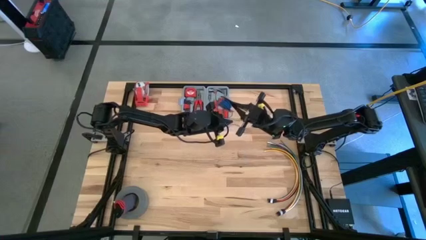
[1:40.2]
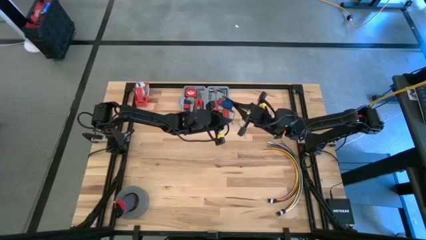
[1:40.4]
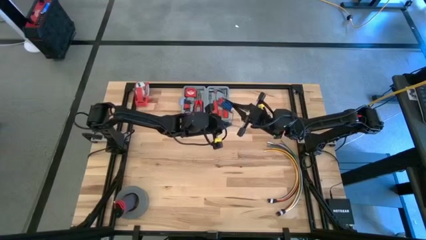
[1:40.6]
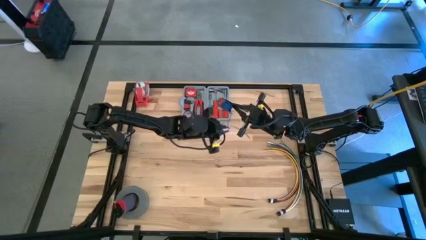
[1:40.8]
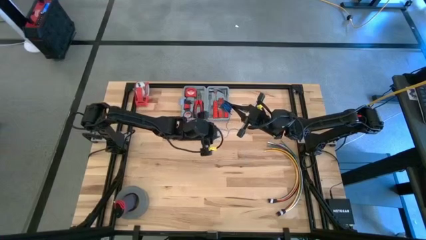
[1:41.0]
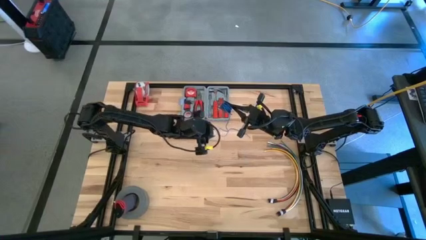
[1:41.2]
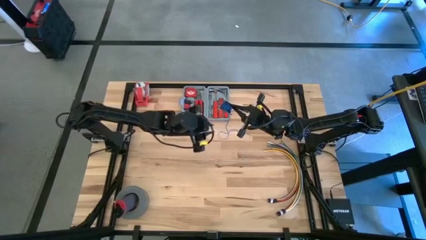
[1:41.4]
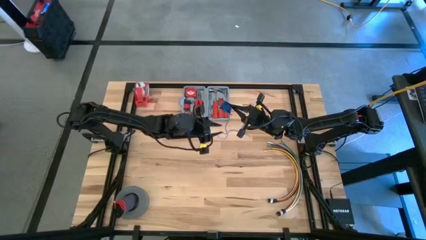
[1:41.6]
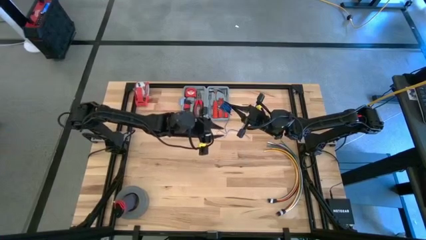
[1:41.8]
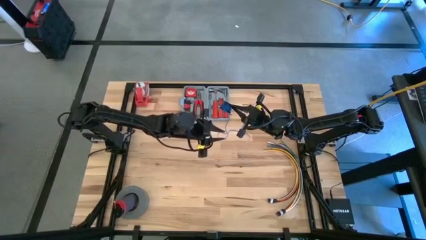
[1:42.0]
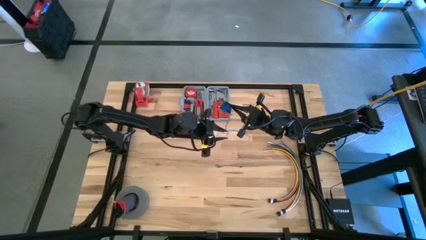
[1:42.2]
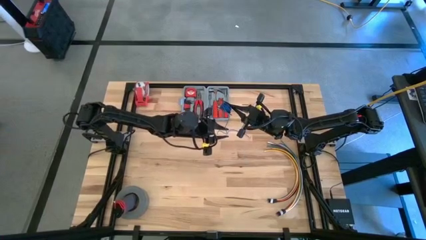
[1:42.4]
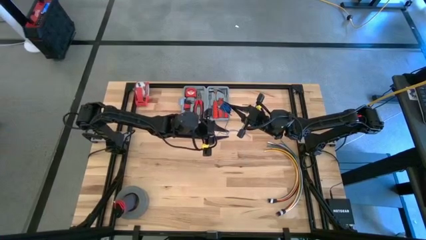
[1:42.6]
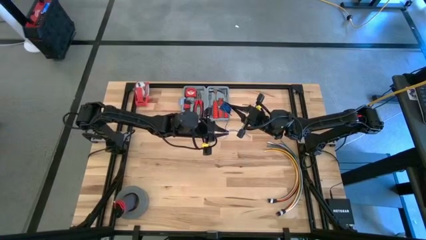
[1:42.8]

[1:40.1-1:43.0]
Task: Coil cords
Coil the blue wire into the black spool

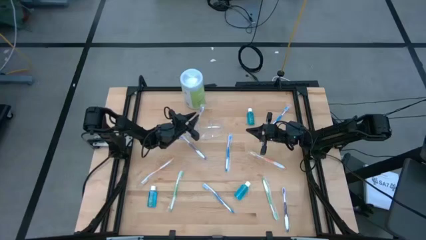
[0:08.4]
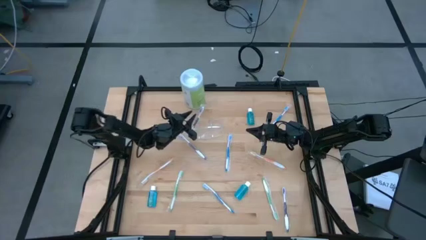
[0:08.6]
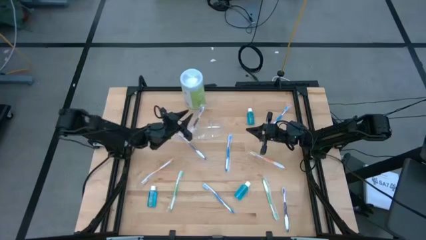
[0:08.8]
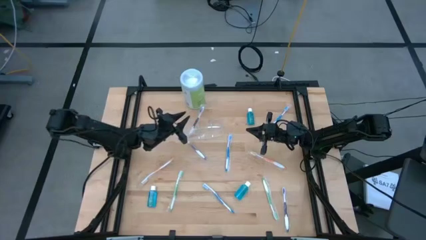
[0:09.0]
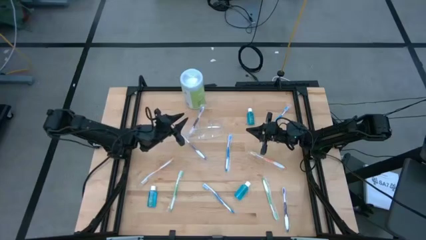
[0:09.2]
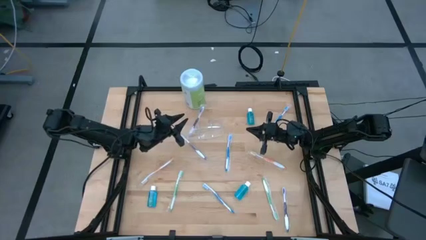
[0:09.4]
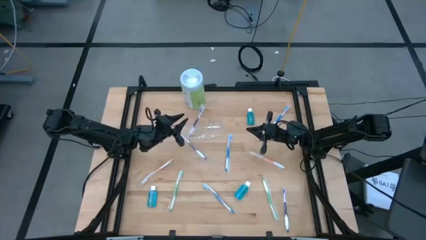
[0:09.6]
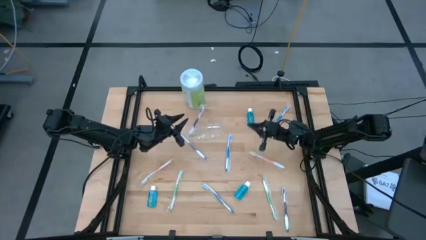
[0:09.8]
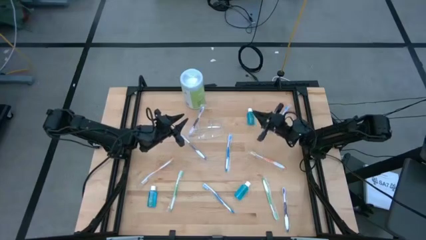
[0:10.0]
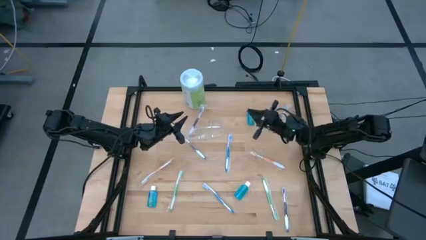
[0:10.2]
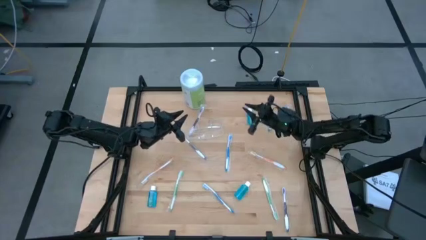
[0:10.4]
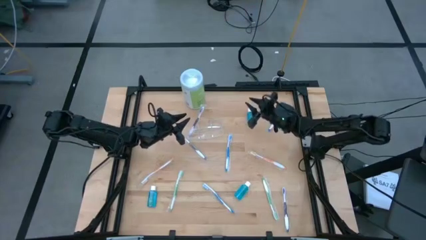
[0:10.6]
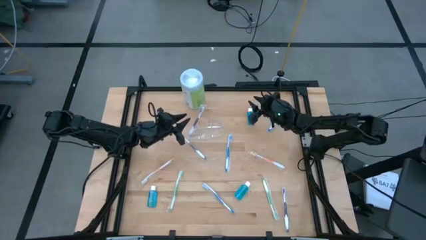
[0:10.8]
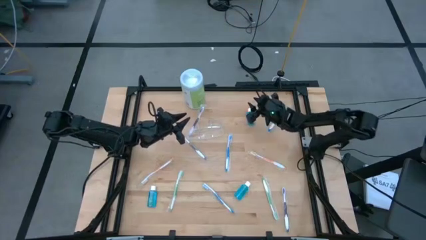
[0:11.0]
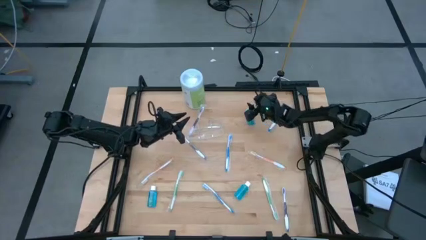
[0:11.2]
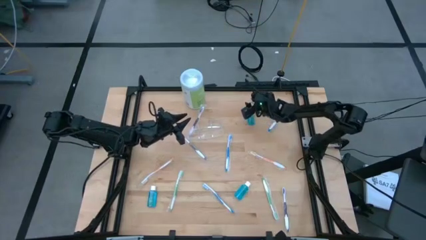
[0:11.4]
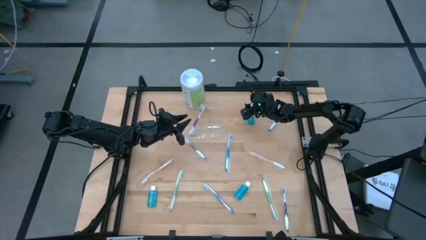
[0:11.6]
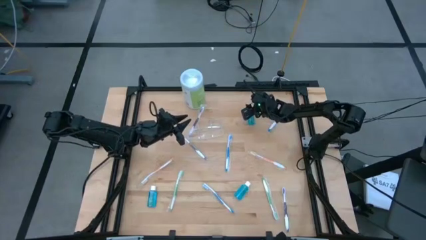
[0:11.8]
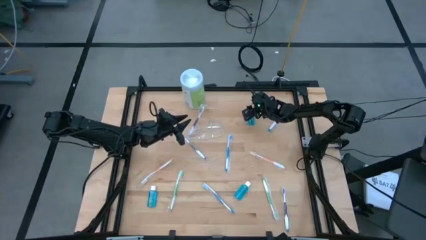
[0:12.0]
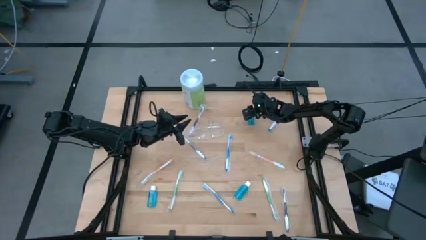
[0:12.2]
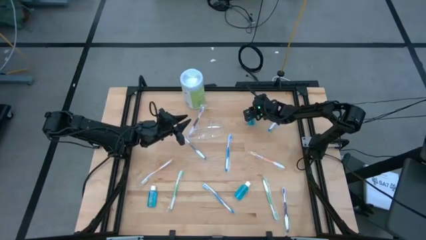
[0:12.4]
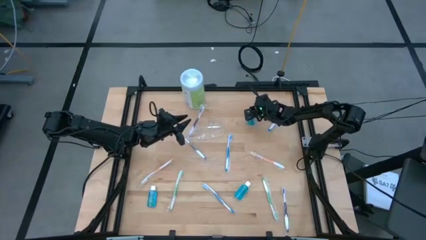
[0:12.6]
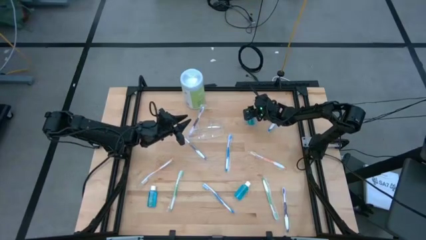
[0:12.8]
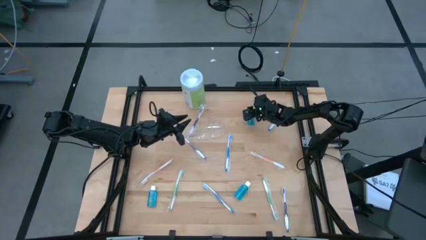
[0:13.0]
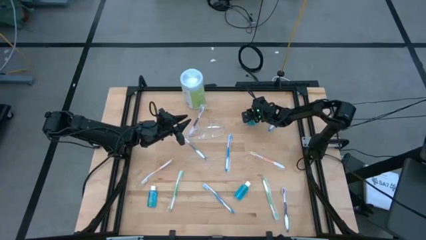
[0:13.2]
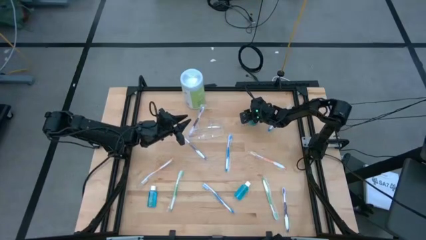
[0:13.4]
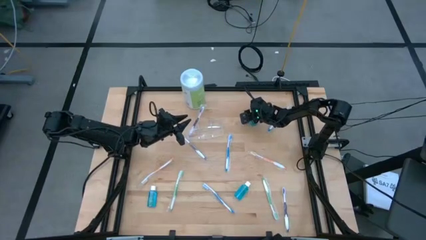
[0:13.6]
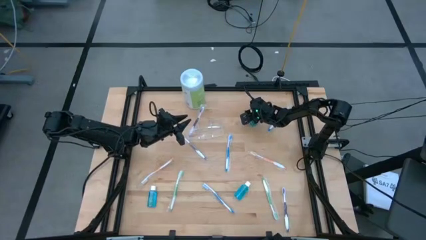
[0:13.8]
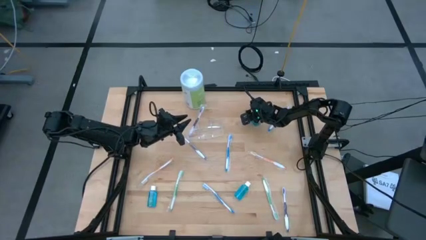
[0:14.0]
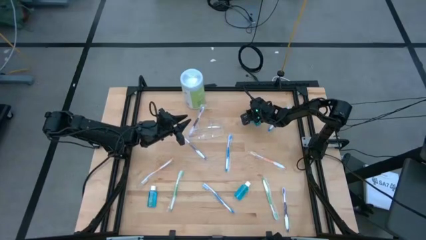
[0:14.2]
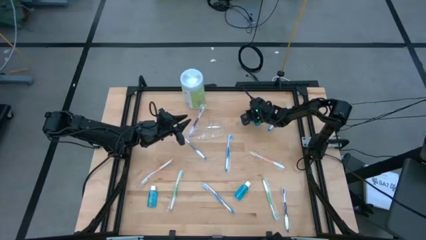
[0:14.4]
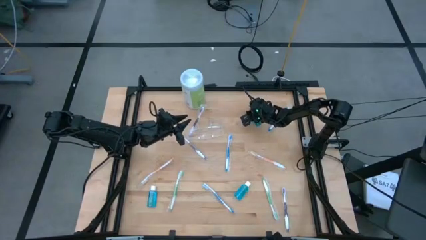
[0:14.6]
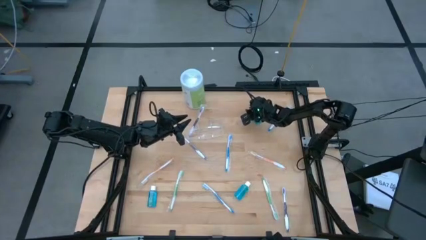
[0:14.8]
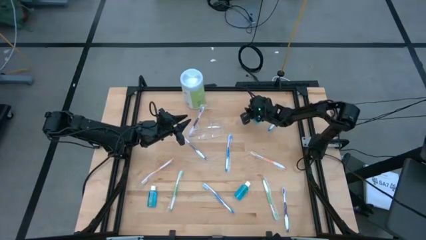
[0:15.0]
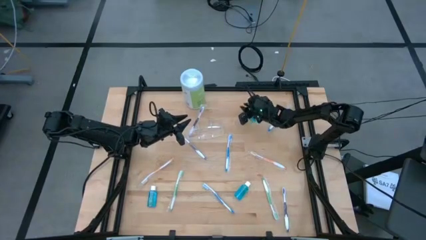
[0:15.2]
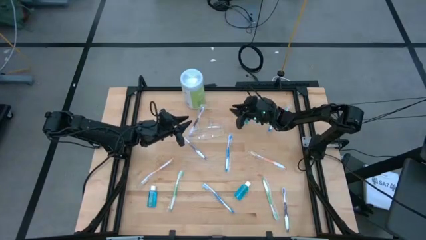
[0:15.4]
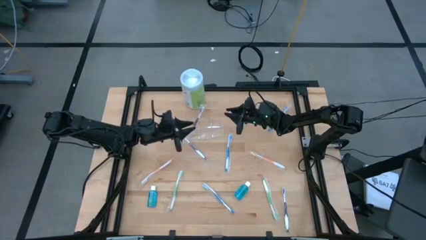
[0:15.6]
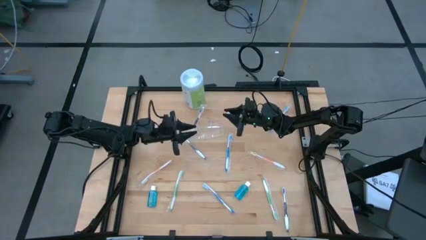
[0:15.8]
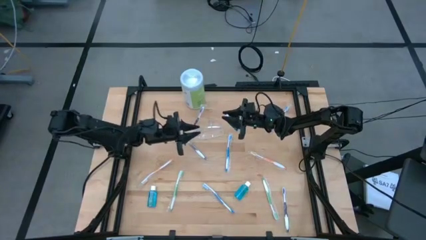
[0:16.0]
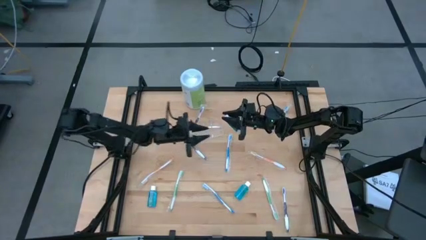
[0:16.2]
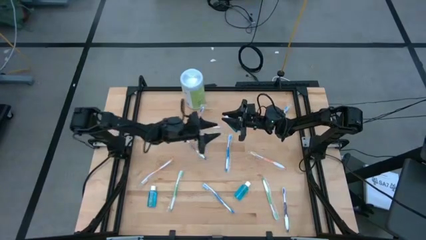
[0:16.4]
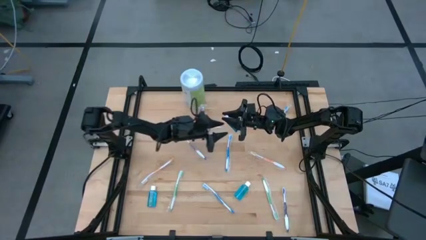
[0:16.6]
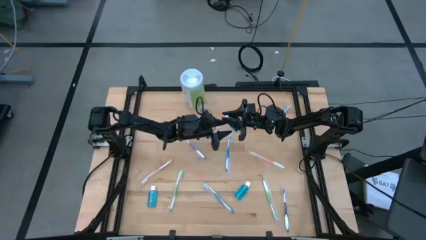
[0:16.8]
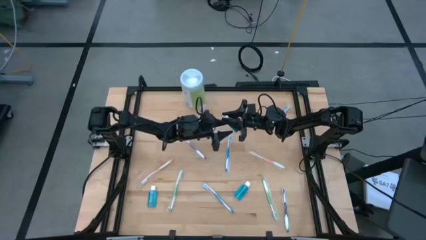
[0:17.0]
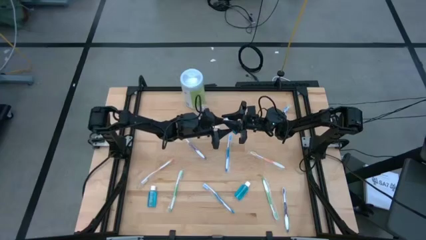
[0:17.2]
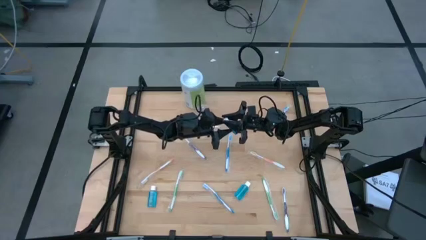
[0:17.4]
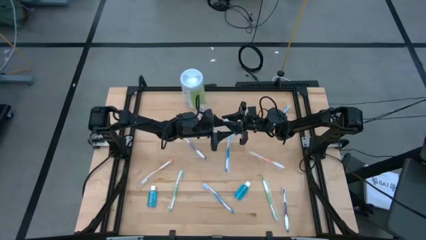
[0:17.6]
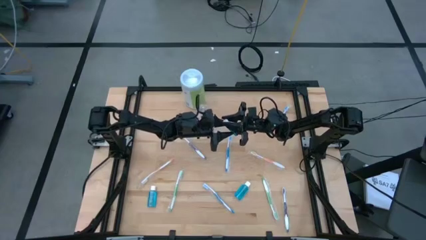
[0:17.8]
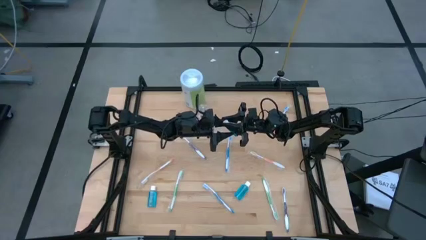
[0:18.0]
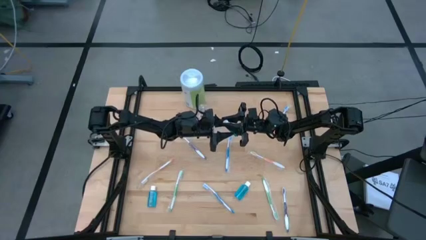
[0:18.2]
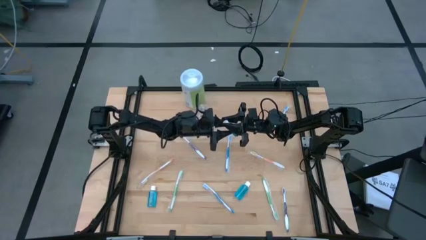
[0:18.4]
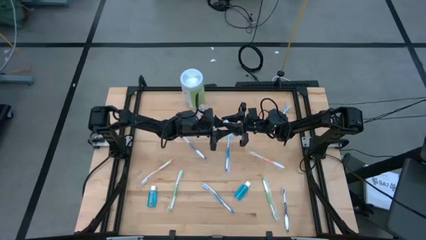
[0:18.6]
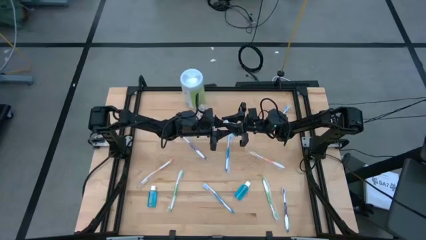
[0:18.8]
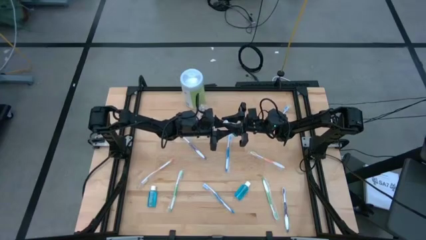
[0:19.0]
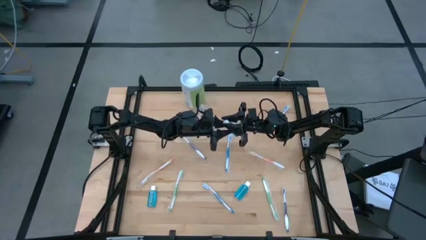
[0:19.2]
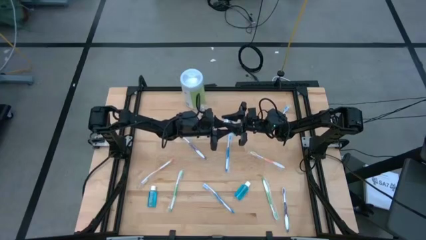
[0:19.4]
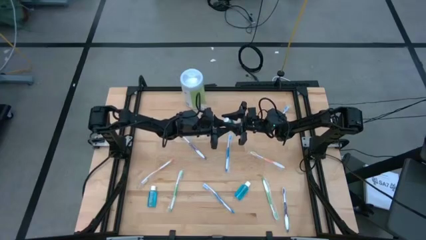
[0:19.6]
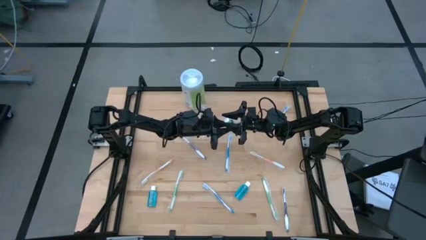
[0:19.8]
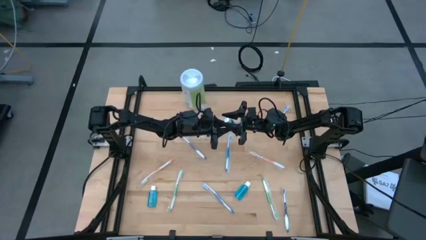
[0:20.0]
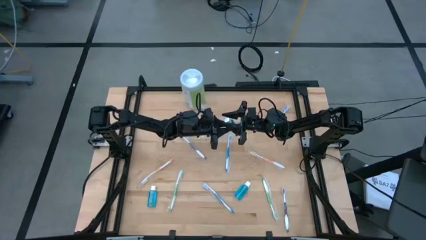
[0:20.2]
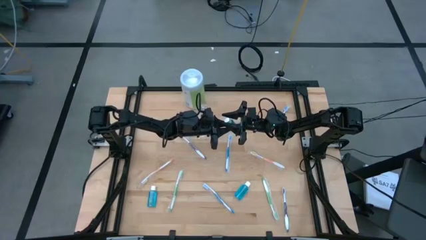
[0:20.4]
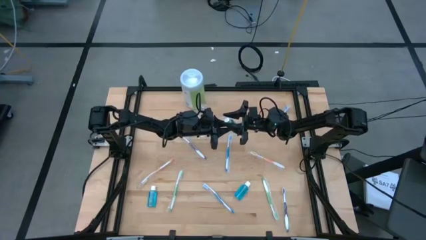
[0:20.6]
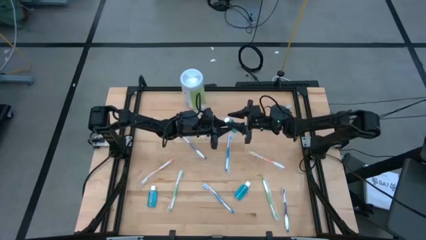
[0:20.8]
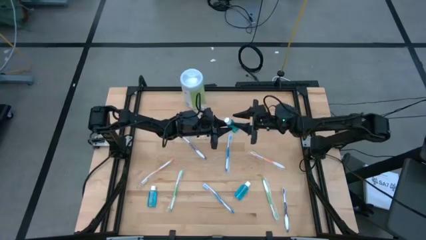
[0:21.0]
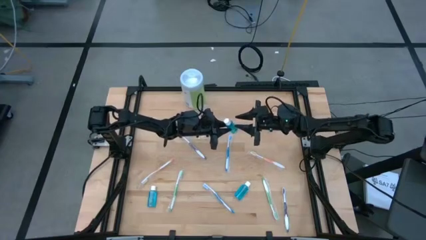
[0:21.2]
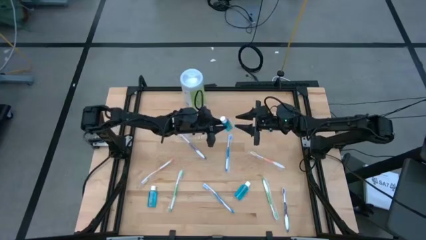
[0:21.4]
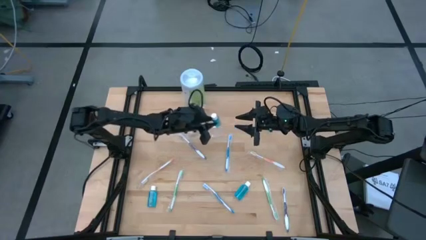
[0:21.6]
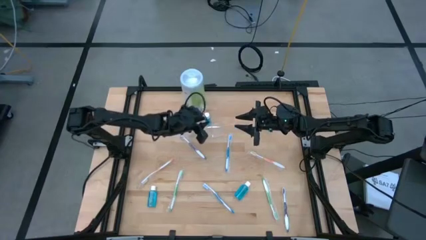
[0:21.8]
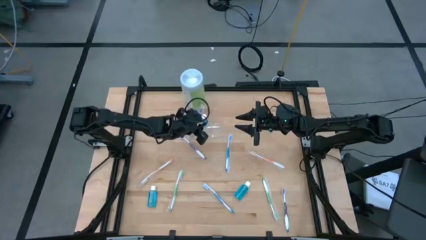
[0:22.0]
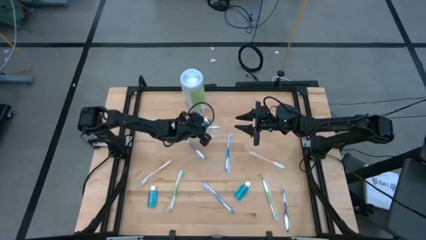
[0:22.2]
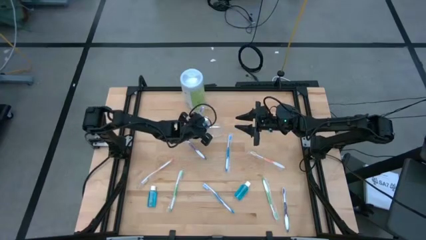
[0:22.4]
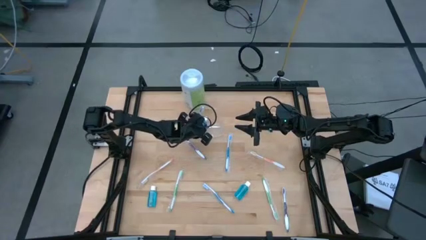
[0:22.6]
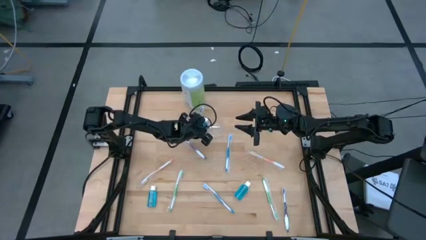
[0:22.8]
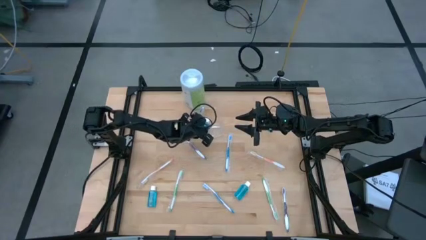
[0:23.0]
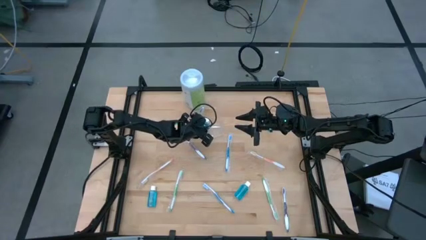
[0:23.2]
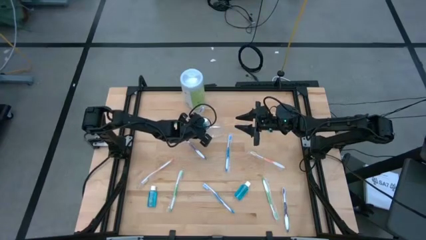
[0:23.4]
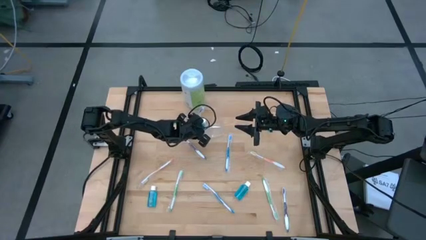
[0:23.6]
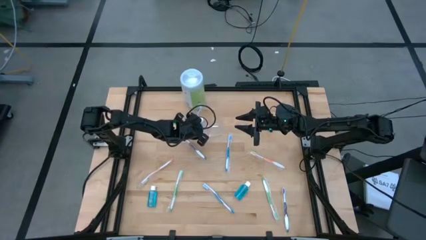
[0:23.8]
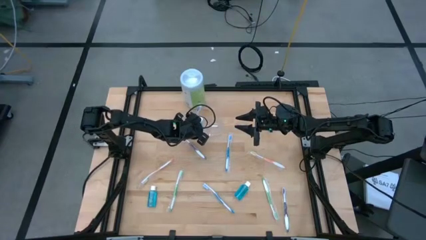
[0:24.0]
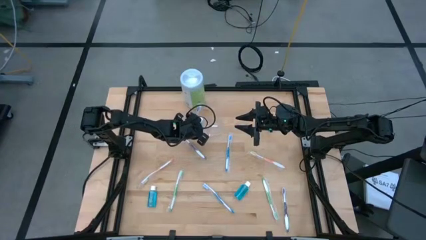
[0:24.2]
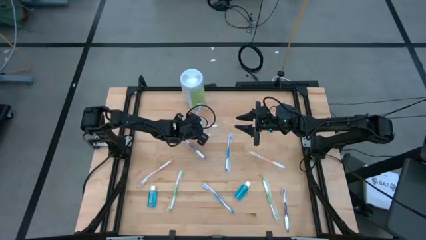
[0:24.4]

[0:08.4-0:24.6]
Task: Pick & Place toothbrushing station
Put the top mouthwash into the center of the transparent organizer
